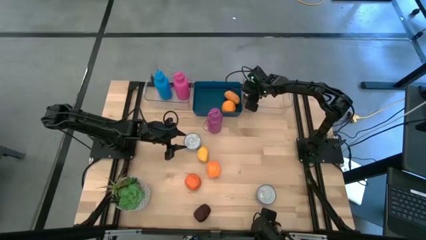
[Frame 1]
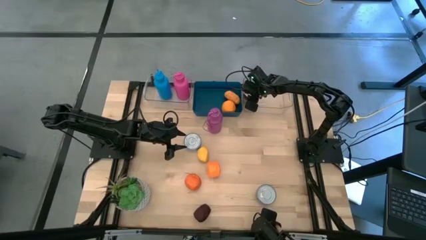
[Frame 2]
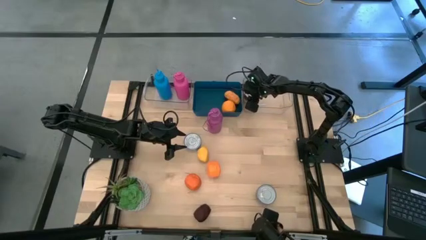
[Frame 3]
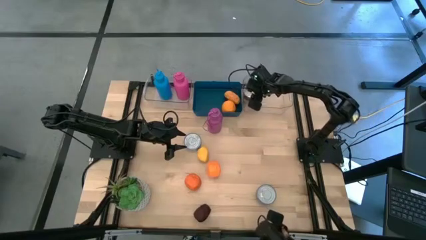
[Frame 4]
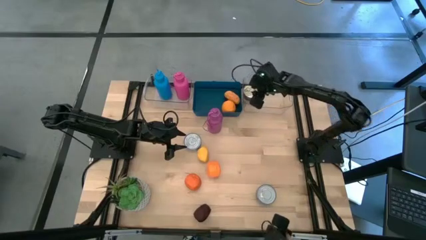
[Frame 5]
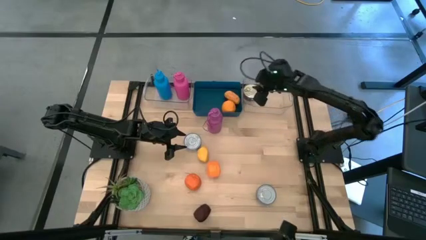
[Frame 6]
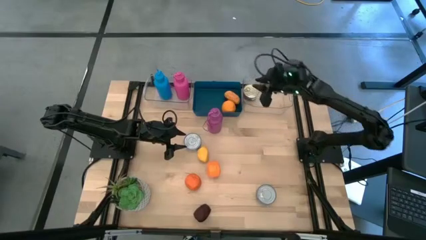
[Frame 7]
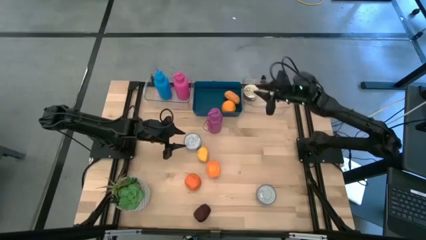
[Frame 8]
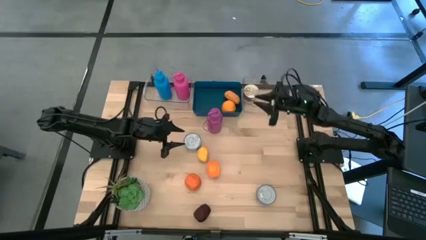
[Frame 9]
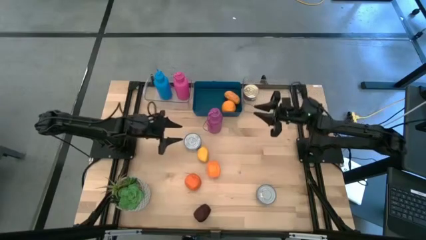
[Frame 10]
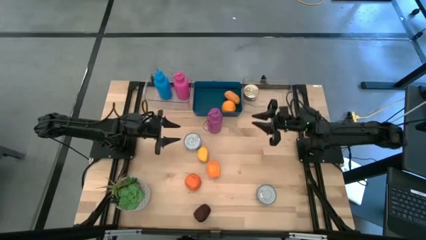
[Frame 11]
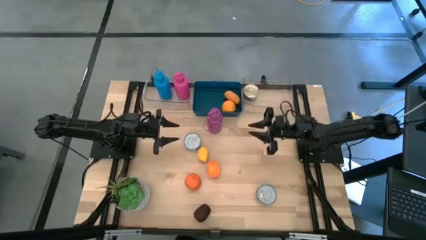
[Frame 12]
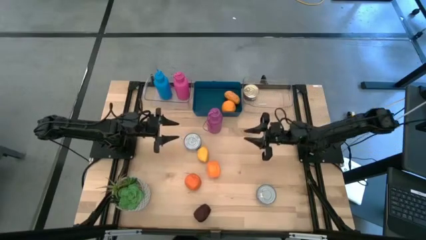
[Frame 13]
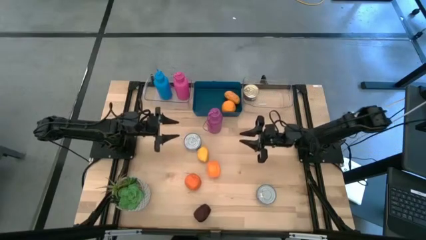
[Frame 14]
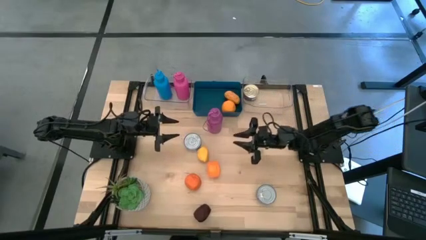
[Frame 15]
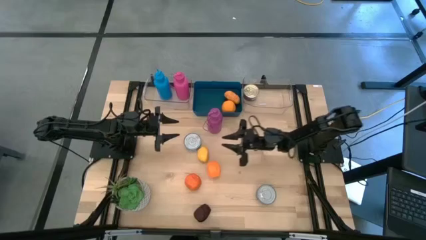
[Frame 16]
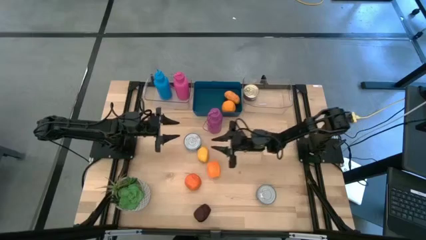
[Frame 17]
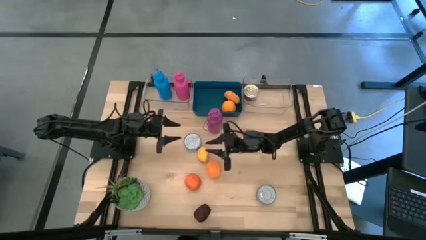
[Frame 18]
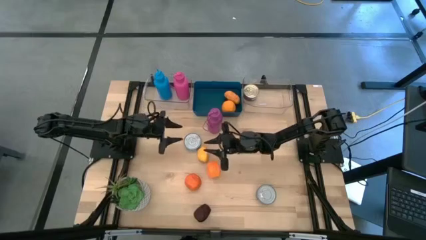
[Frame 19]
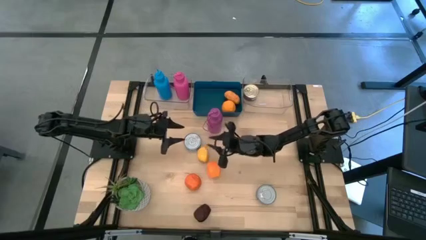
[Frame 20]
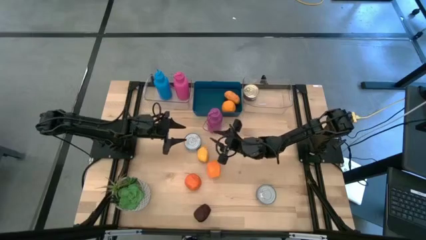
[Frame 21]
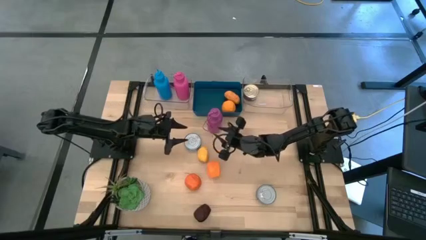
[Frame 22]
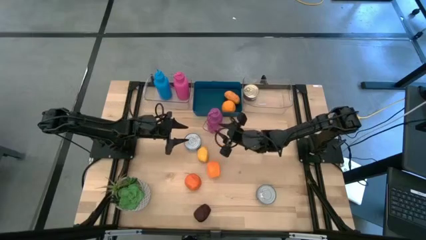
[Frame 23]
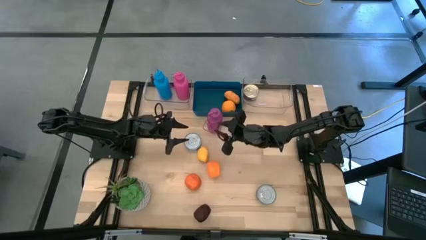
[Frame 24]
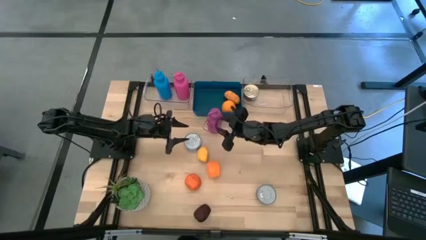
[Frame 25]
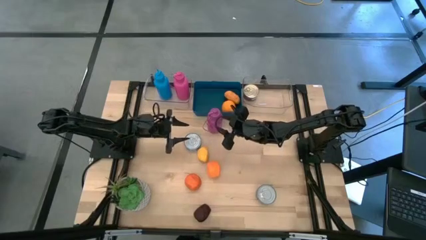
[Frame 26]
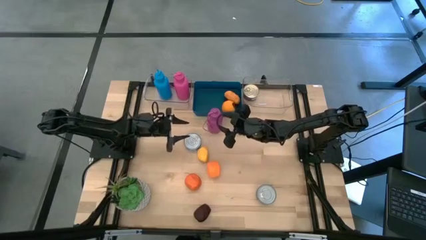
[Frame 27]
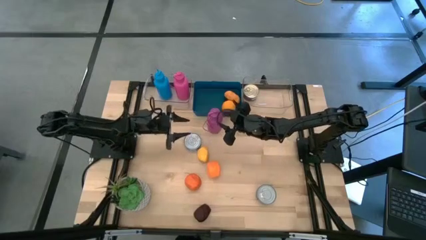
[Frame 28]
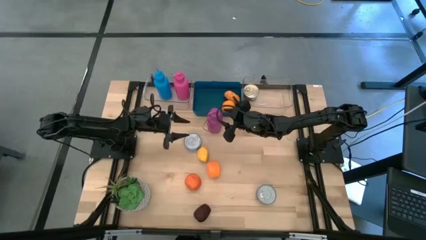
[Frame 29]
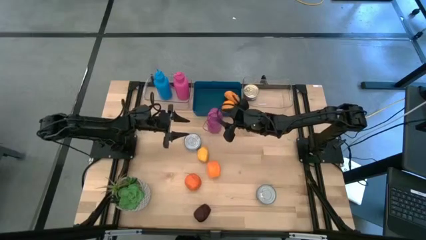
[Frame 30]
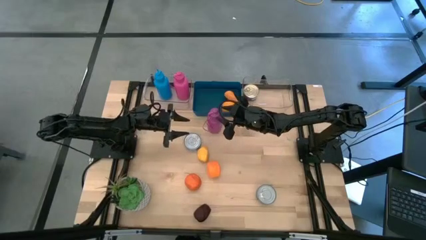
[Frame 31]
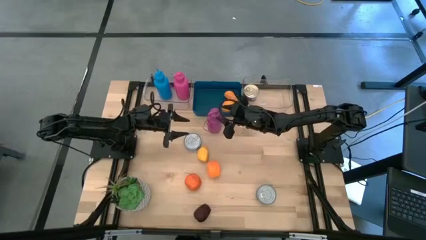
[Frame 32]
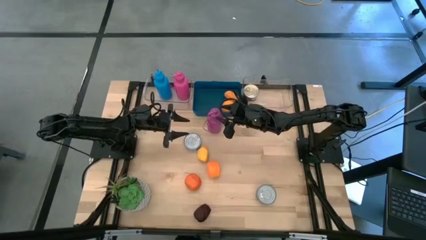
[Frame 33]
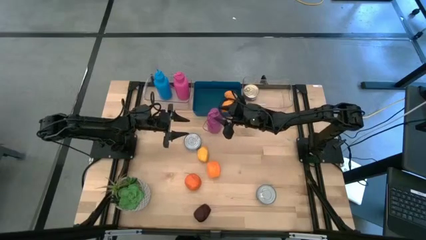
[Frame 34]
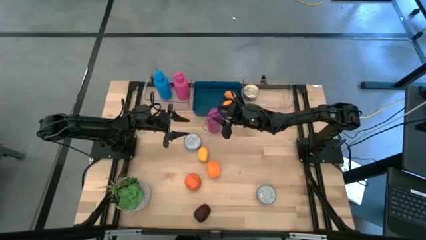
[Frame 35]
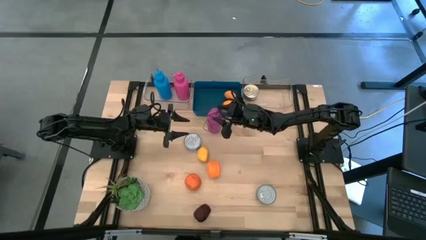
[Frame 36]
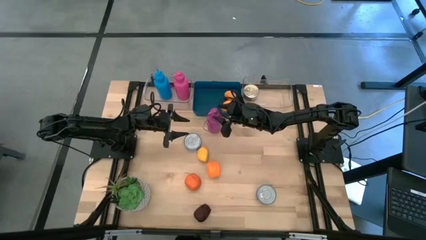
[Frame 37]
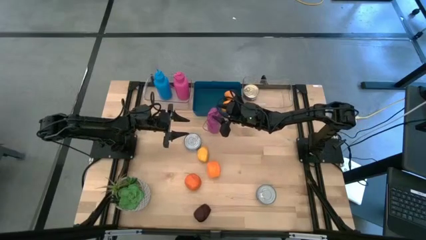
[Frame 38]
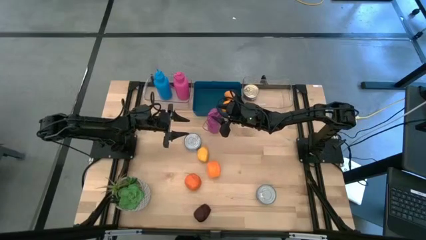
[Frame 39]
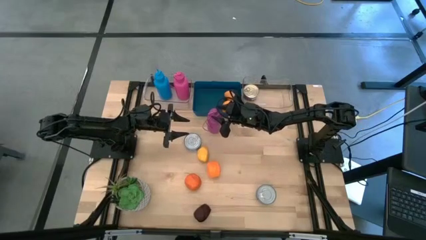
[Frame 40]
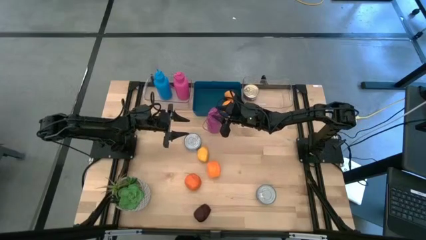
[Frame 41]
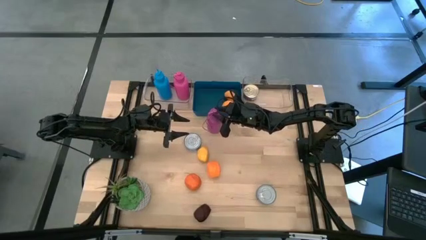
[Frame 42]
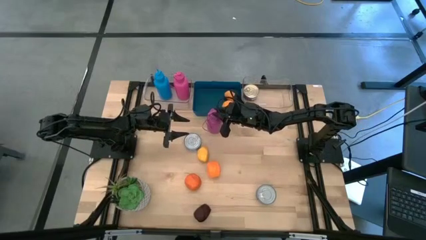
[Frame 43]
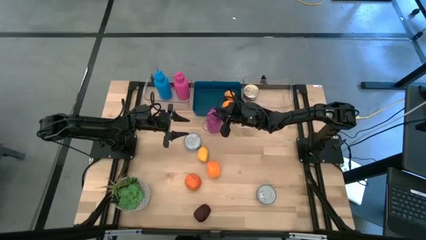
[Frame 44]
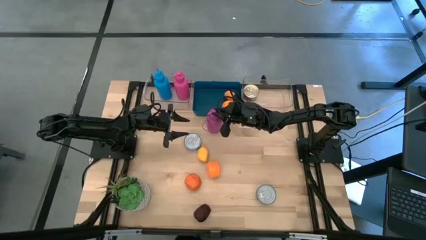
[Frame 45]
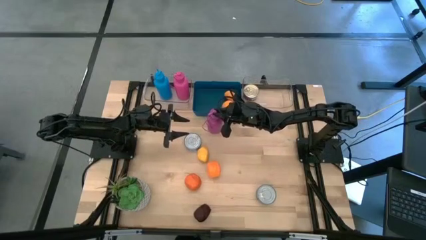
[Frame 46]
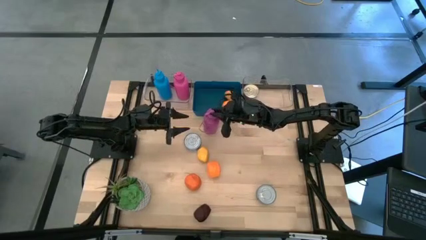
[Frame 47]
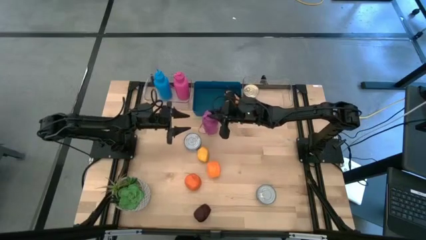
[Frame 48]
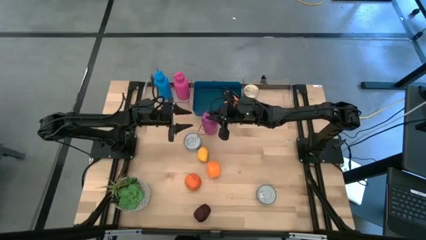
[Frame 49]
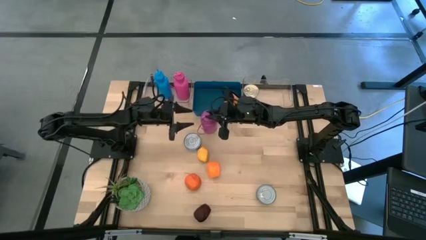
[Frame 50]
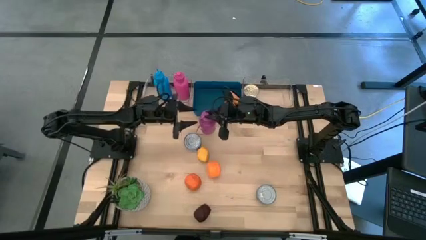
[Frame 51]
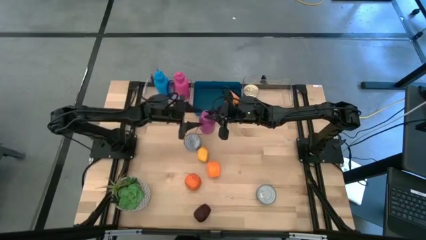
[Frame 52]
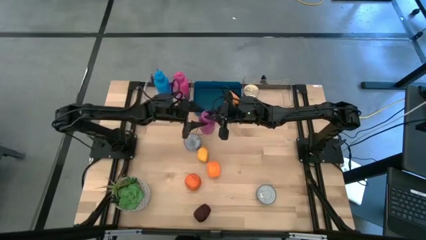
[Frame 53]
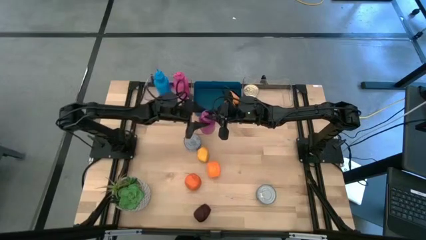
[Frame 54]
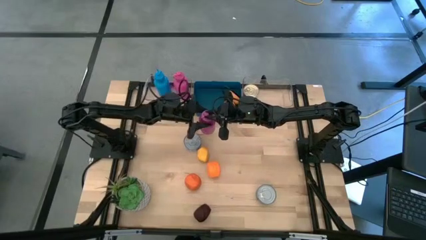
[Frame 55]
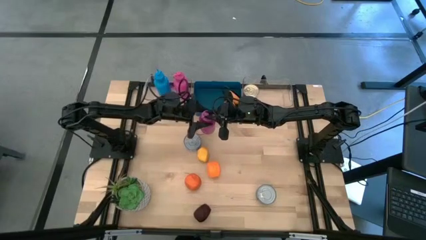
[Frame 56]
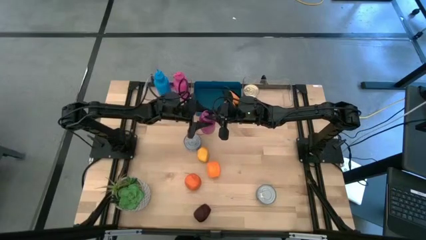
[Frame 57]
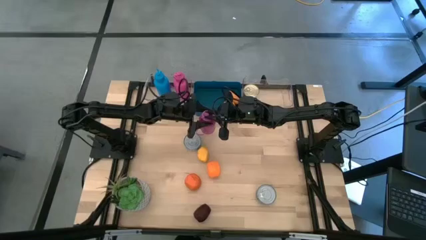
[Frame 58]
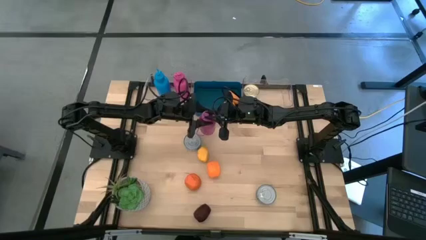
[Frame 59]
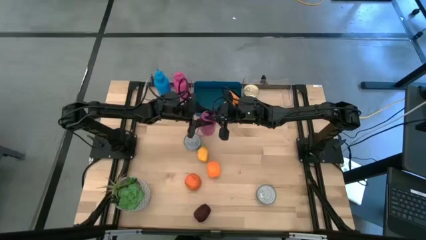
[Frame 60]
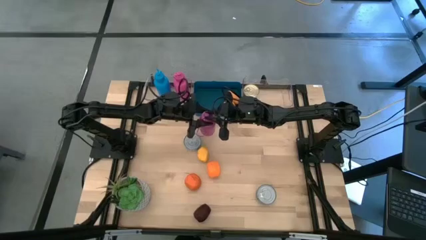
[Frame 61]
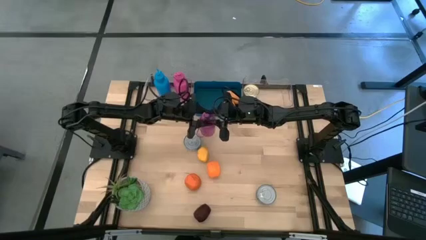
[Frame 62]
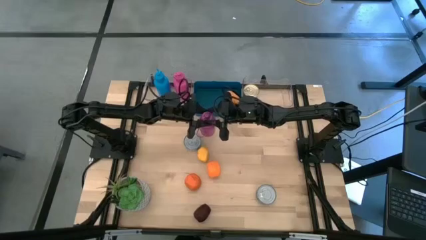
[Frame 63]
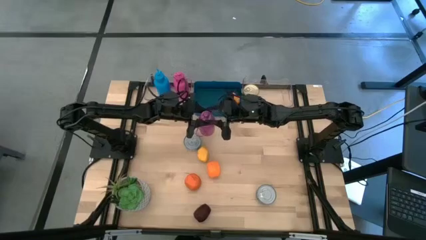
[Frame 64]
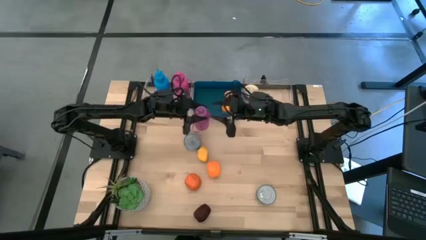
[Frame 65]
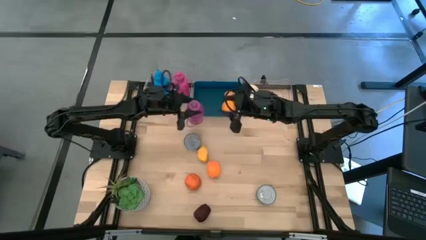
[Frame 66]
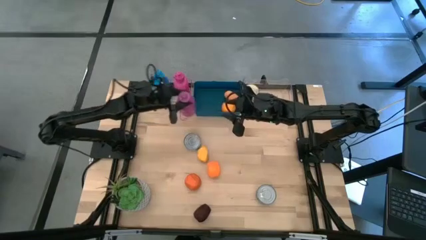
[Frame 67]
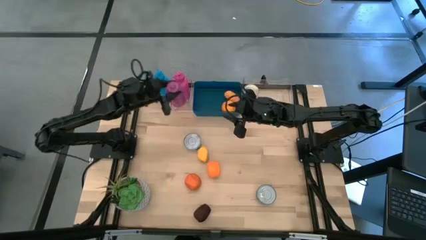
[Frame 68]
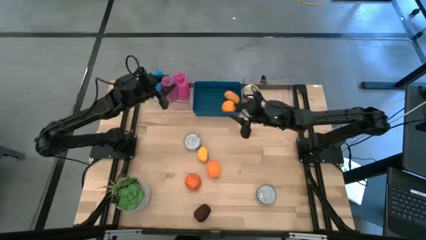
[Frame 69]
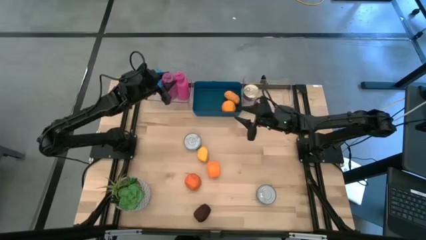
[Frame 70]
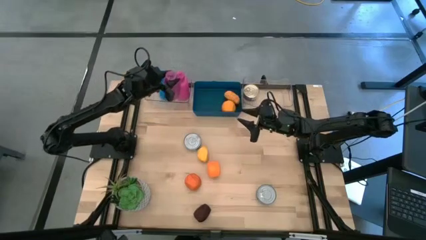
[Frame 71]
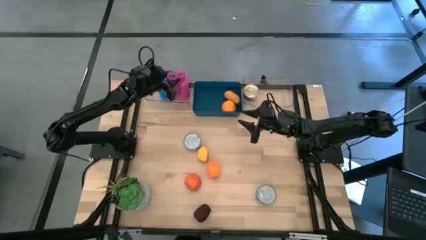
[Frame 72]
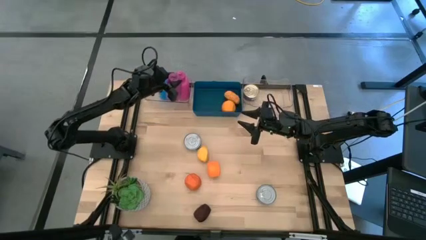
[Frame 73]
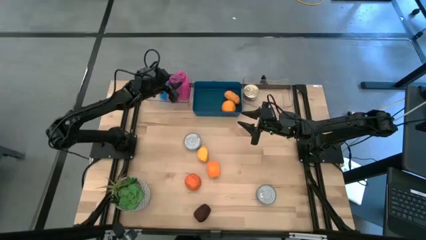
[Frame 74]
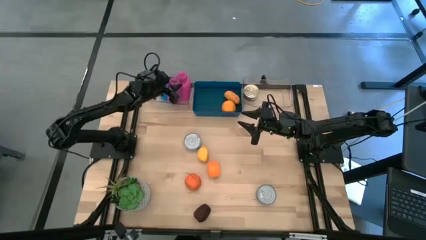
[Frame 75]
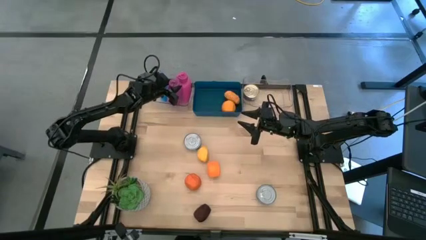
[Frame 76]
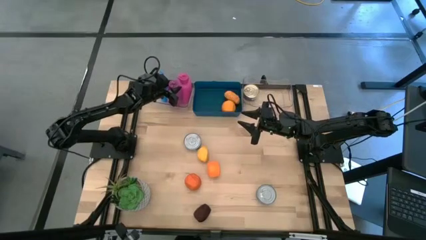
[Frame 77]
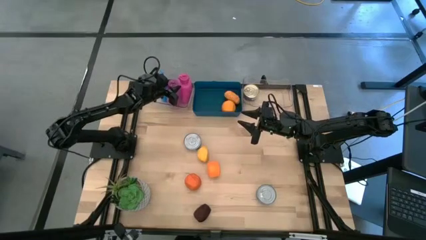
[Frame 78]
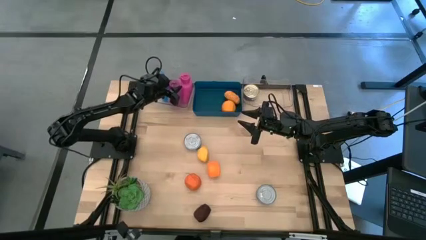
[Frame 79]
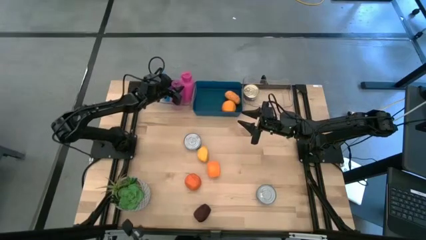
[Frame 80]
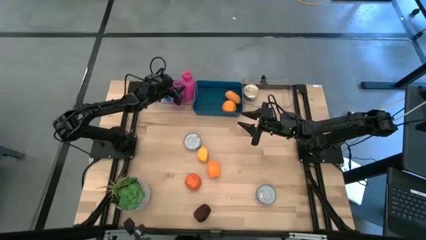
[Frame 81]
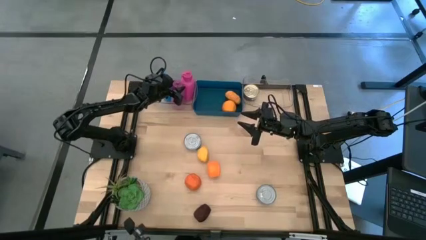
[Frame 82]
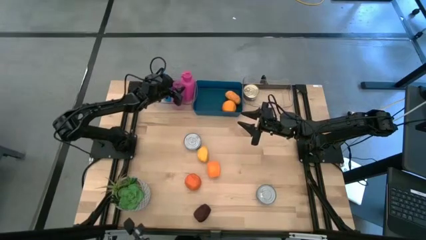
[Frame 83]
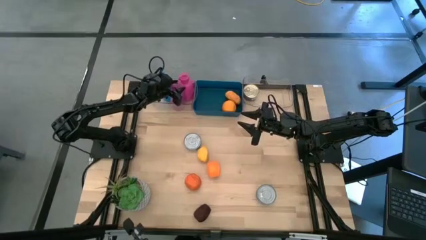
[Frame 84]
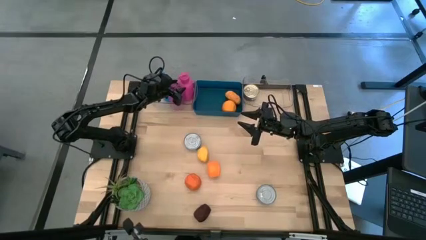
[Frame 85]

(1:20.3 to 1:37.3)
Task: Pick & Place Food Item
Put the purple bottle into the left transparent bin
